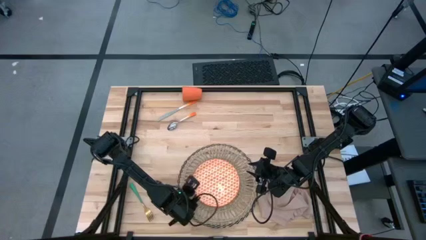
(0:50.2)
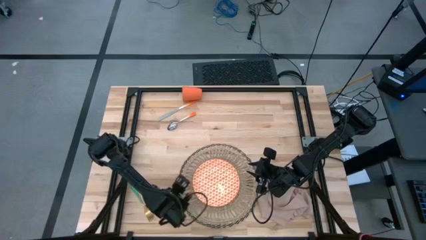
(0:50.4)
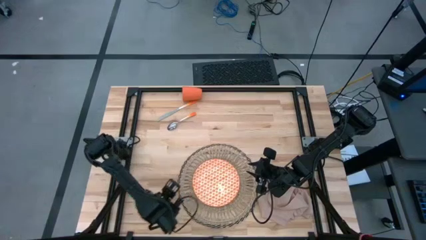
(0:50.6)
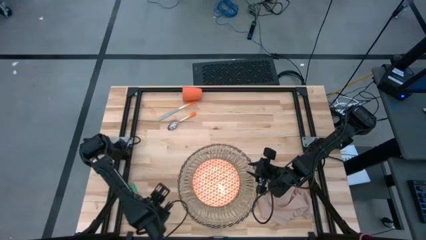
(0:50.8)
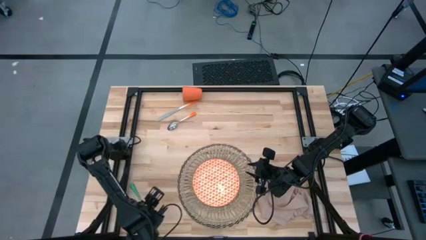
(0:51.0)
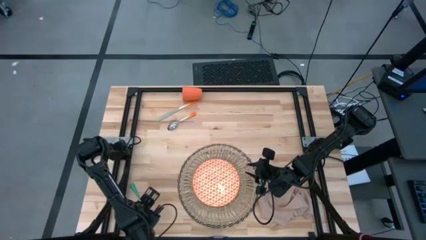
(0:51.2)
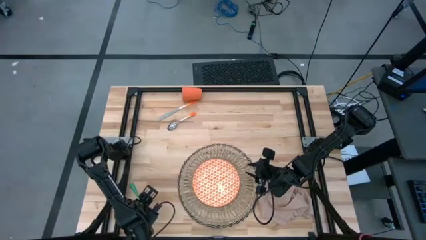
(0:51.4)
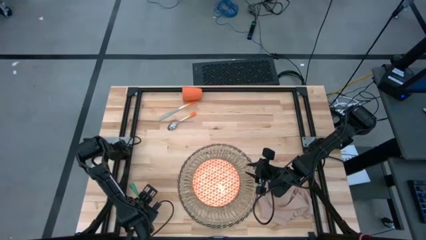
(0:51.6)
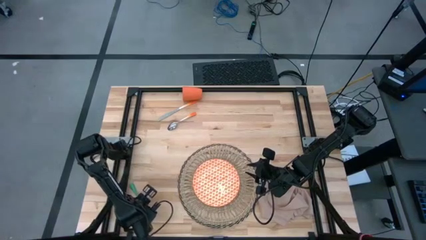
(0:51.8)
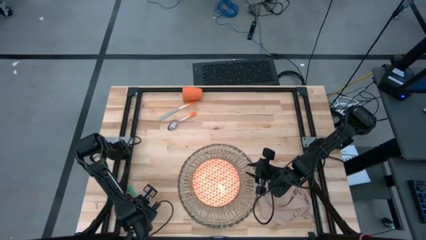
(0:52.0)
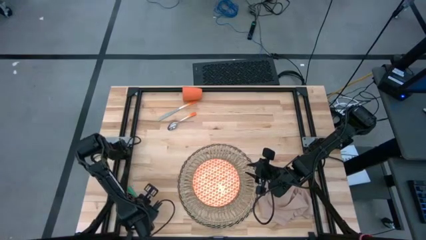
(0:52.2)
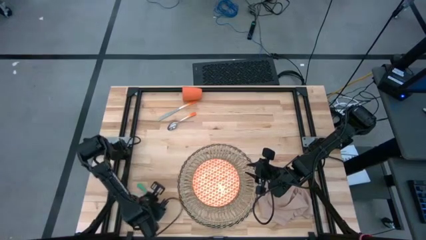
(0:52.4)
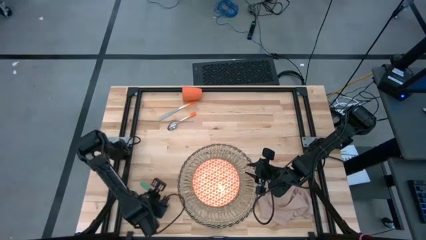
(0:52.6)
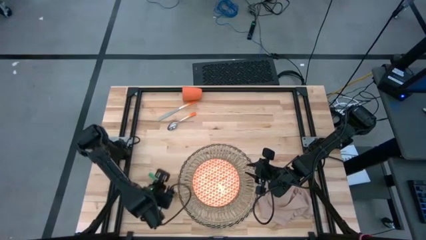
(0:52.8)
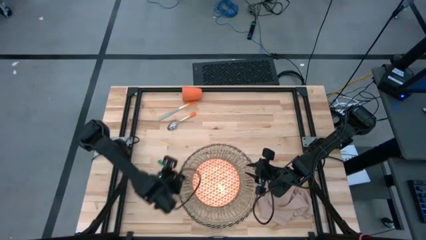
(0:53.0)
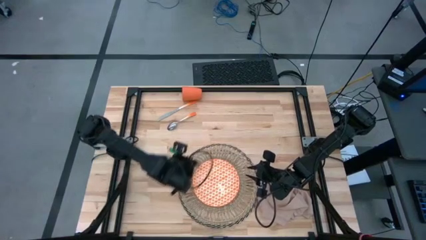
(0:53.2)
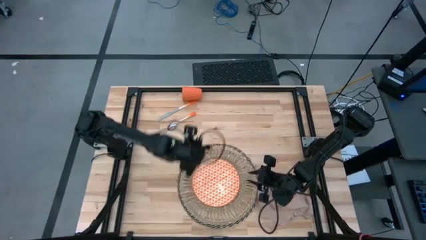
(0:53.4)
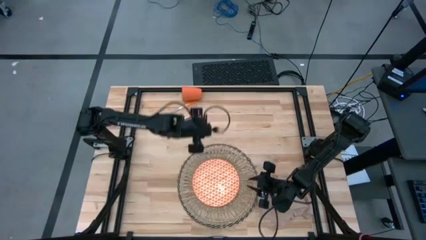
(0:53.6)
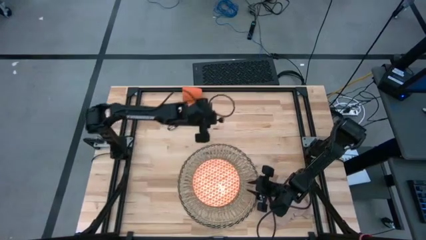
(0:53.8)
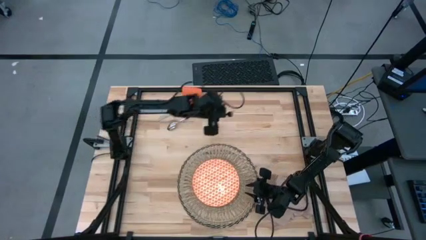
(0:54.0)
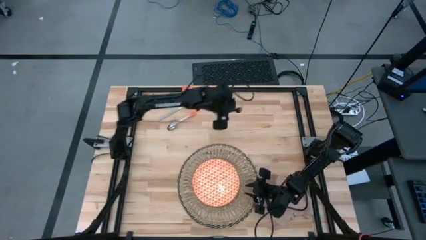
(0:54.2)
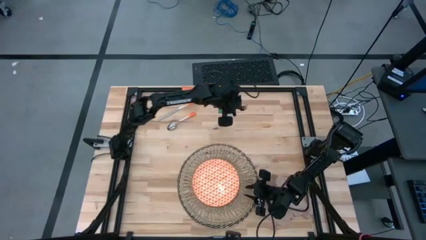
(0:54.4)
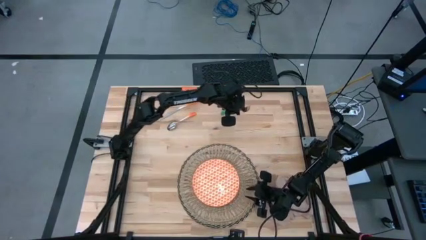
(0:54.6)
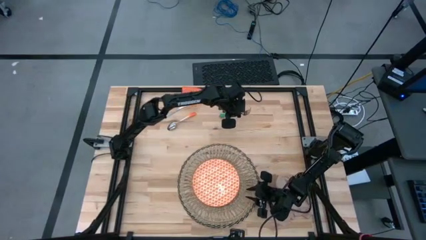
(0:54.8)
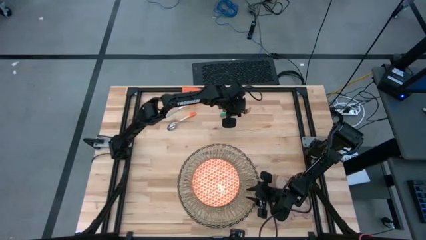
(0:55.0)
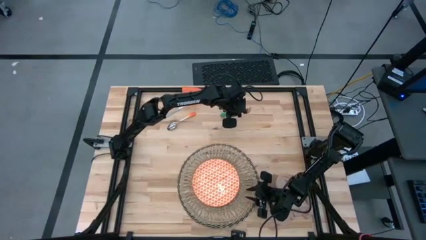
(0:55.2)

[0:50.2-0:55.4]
Task: Set table place
Move the fork to the top middle of the table

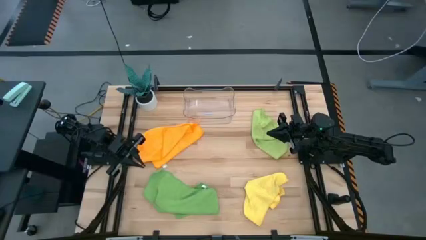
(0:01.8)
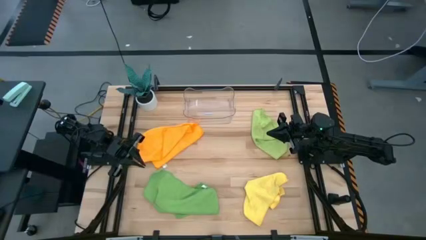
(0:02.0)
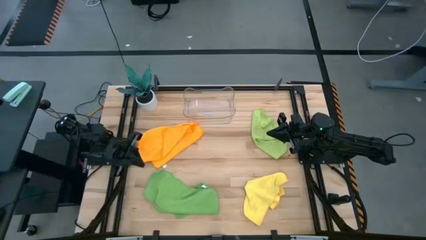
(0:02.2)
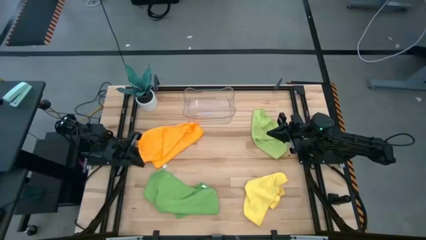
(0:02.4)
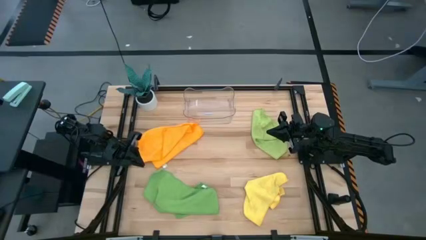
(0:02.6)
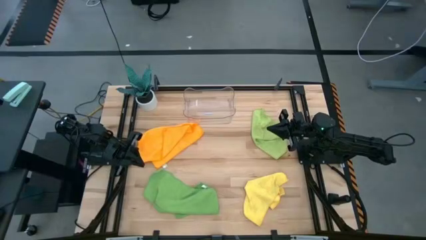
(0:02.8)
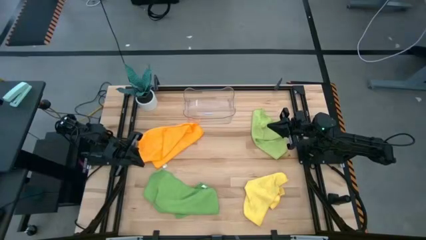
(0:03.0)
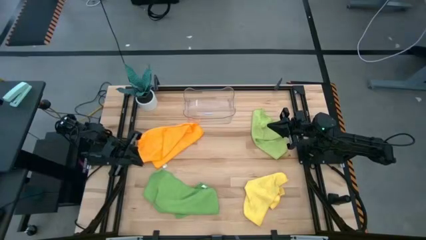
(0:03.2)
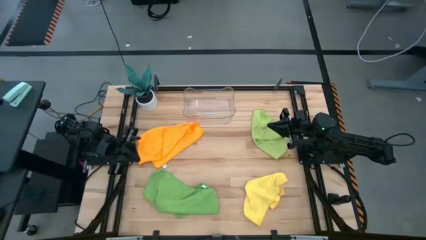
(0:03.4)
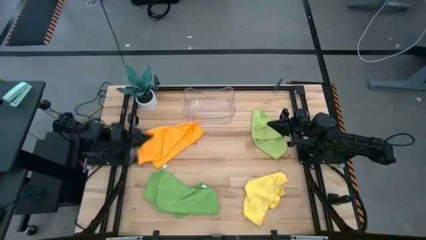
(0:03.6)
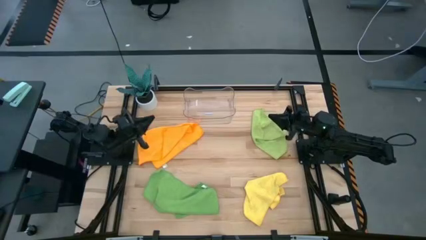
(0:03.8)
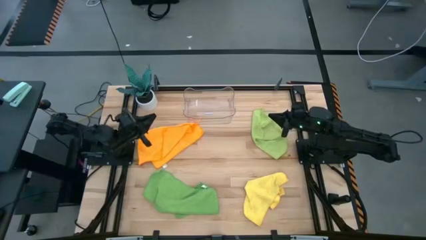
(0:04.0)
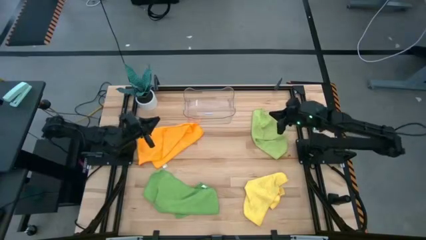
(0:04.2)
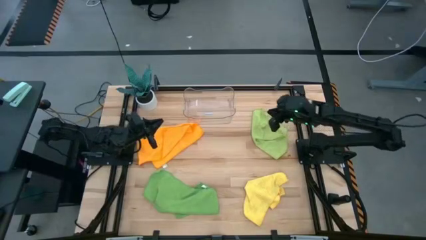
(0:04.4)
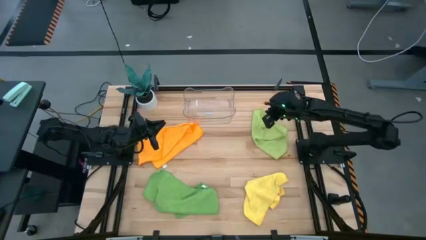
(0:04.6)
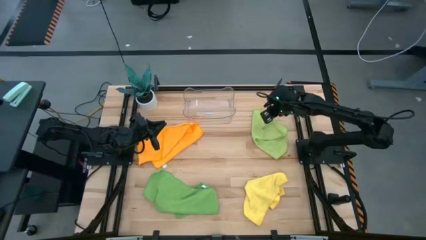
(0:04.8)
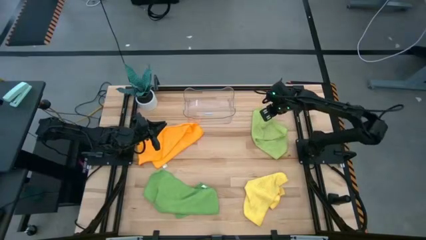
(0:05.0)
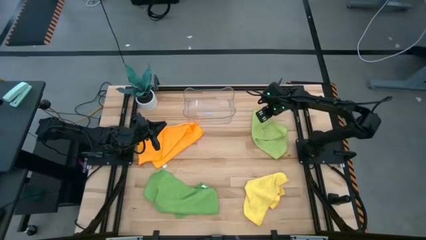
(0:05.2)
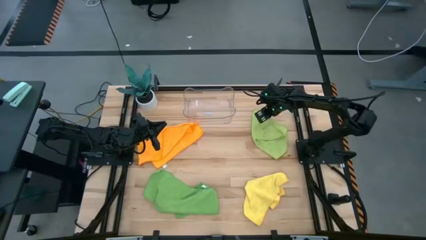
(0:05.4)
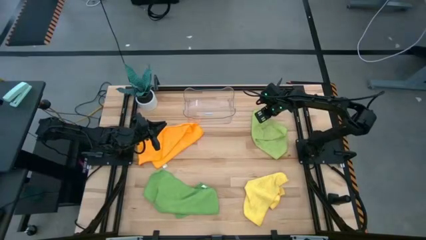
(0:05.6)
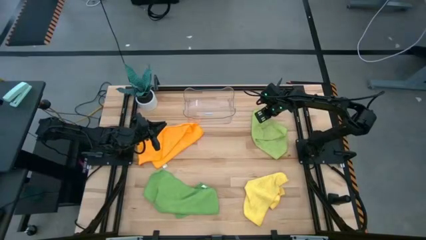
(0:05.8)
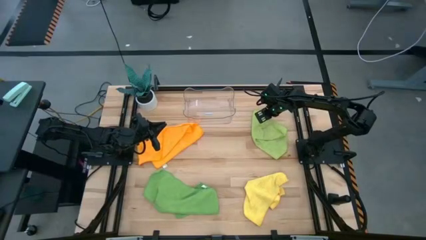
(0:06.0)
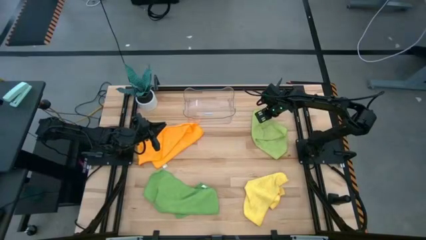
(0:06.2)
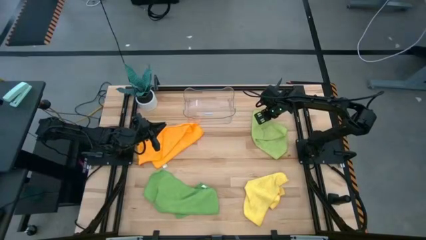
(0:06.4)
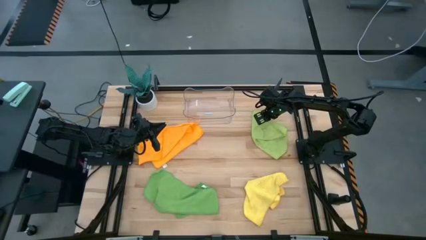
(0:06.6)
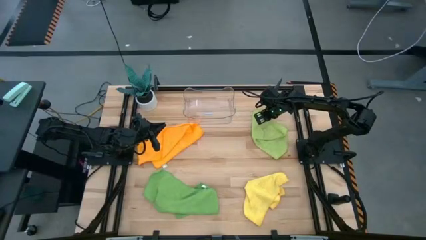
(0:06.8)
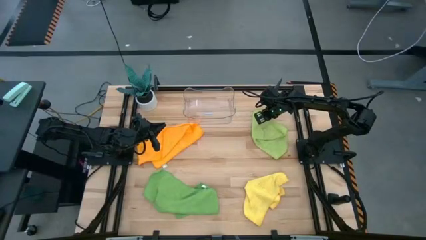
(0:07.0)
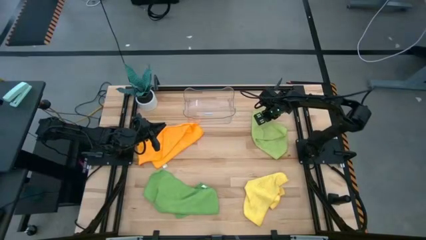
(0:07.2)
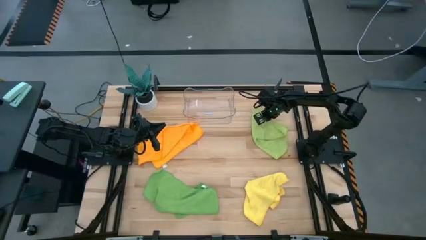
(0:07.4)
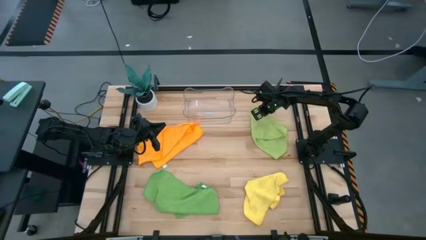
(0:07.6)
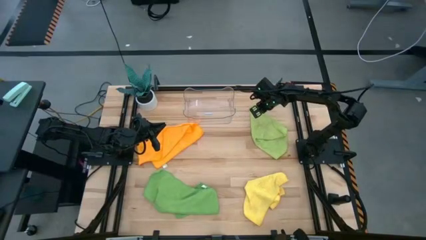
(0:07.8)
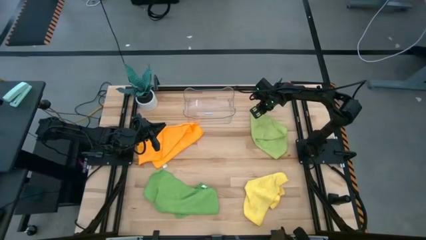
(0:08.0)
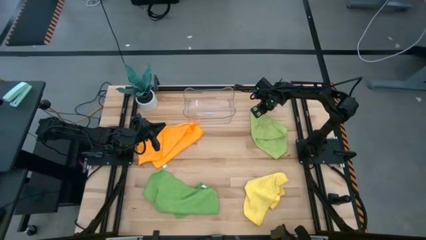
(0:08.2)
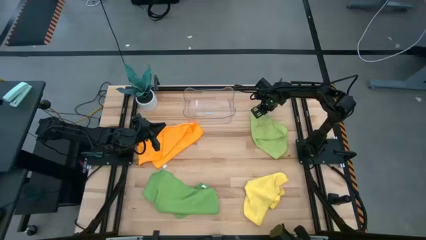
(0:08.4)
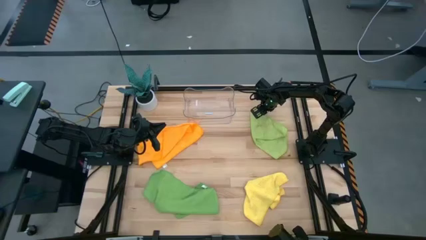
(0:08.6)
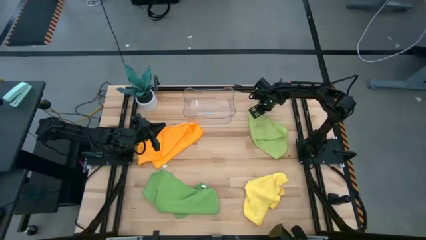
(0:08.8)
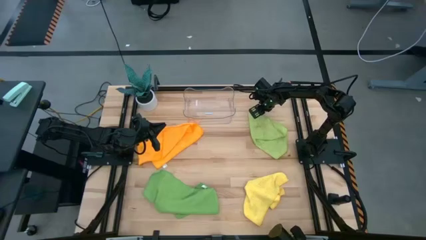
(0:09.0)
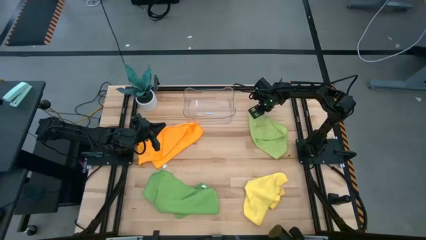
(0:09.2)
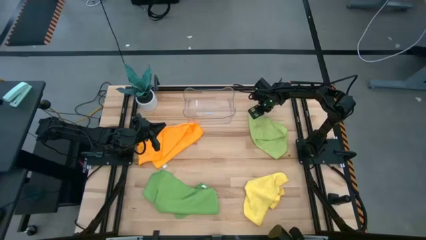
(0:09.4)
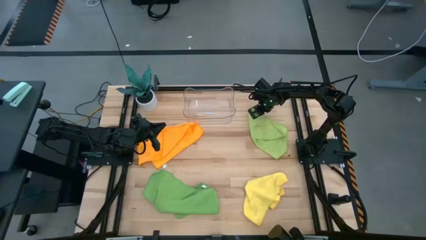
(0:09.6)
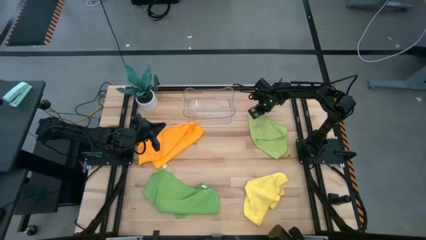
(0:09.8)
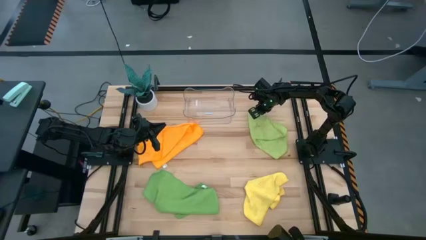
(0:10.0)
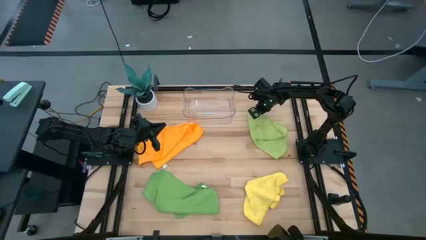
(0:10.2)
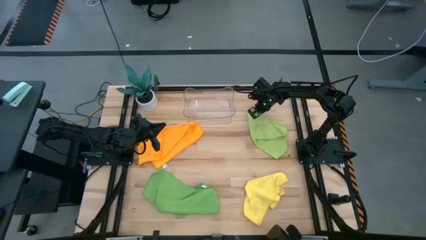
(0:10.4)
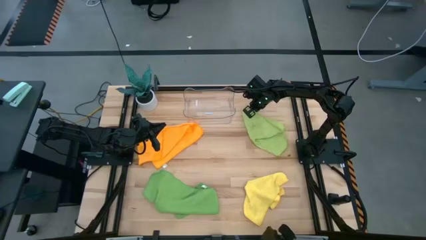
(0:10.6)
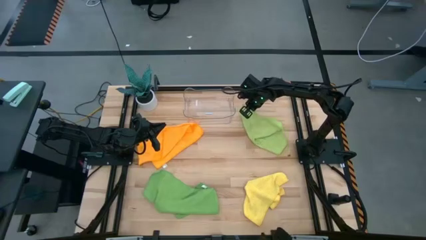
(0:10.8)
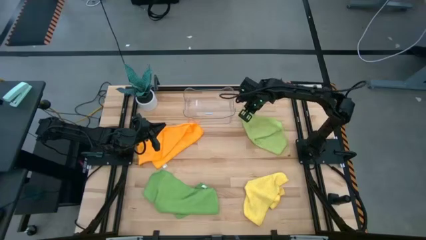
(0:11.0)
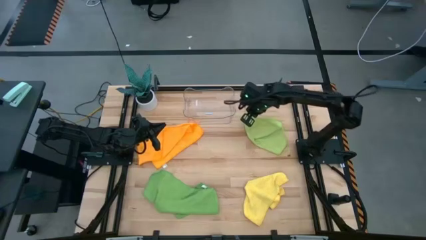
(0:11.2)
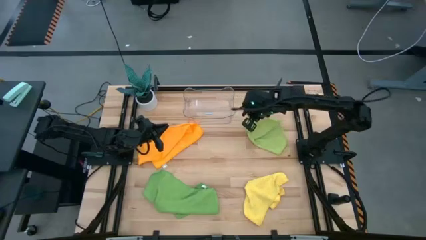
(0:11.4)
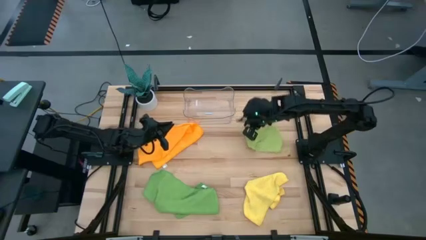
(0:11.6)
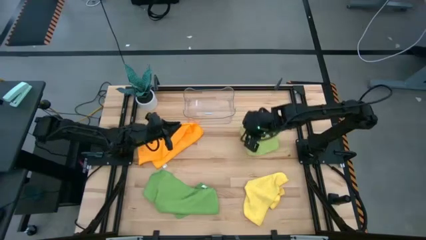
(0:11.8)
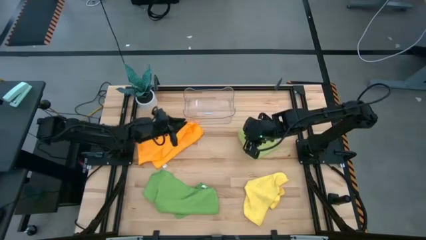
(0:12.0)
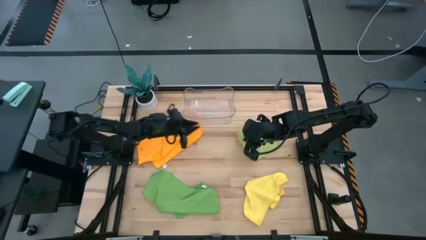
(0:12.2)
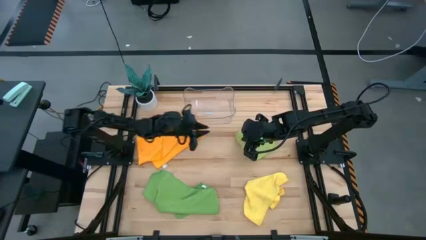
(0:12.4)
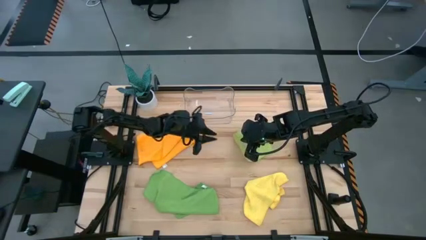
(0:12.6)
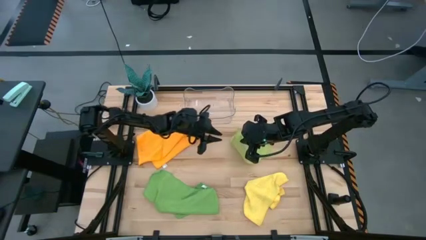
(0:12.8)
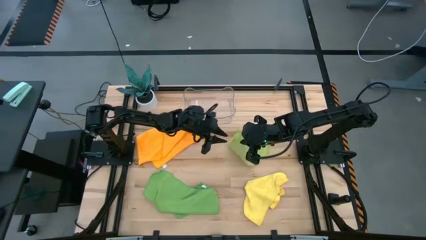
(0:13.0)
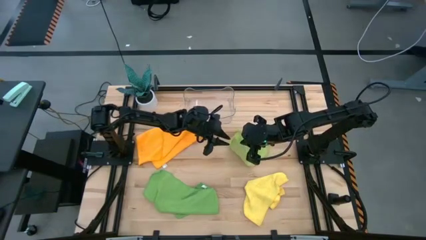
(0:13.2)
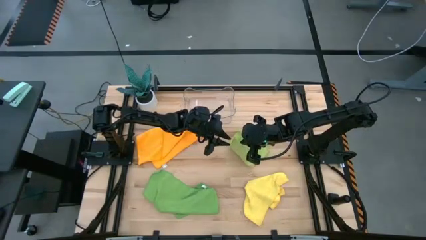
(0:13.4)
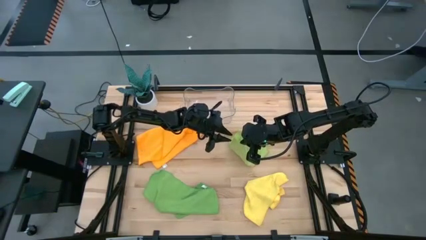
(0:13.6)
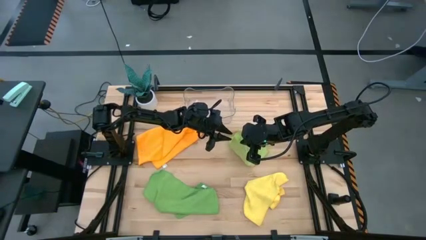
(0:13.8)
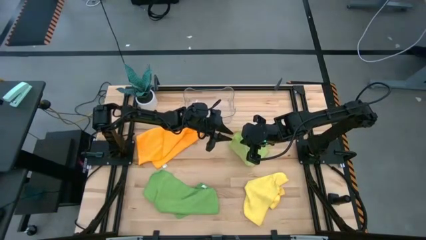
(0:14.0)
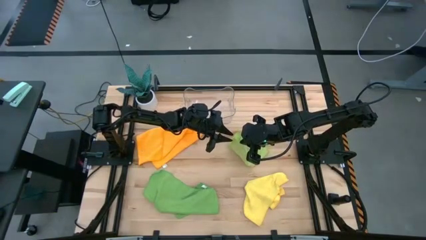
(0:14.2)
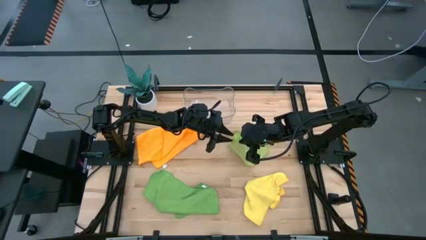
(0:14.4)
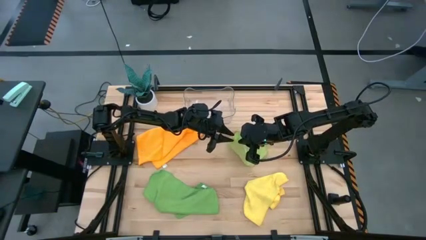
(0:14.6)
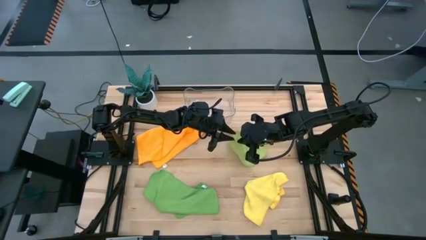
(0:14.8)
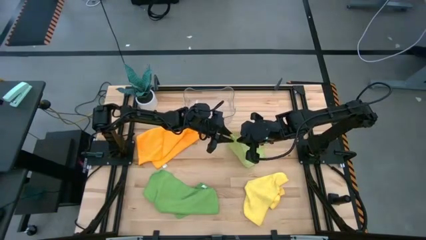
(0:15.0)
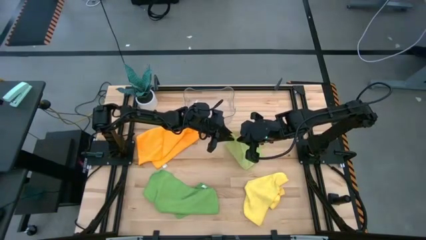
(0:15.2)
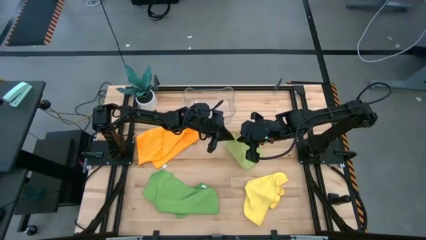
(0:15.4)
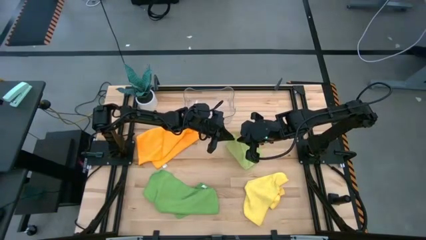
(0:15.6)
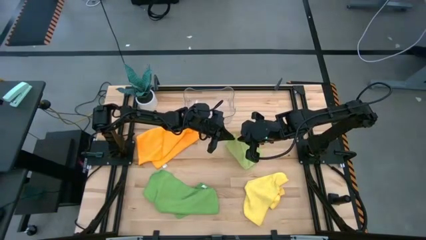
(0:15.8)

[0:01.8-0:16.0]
Task: Fold microfiber towels
Fold the light green microfiber cloth
